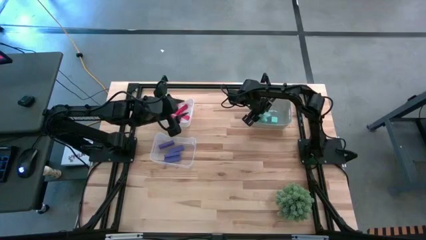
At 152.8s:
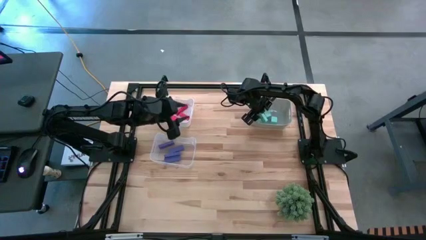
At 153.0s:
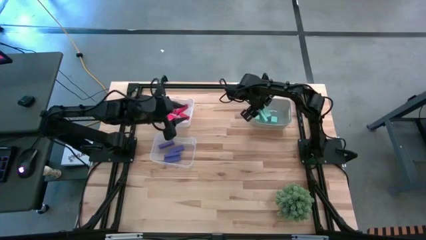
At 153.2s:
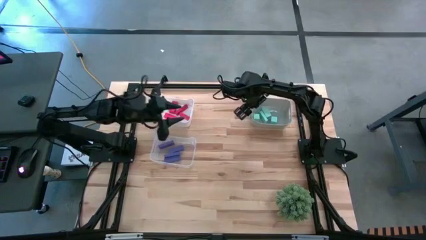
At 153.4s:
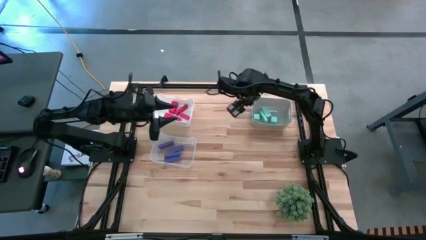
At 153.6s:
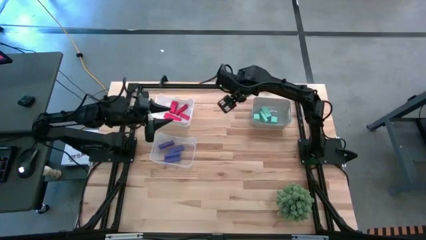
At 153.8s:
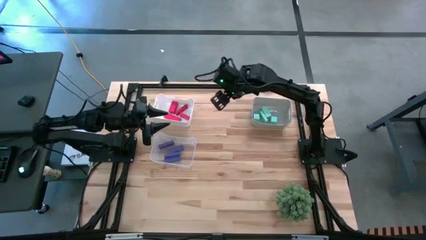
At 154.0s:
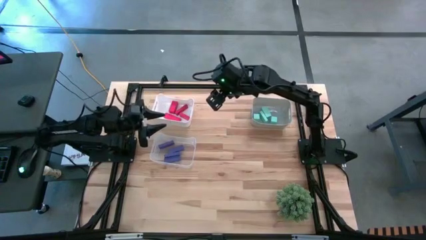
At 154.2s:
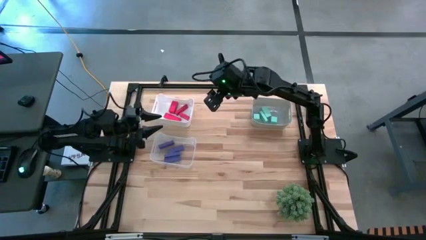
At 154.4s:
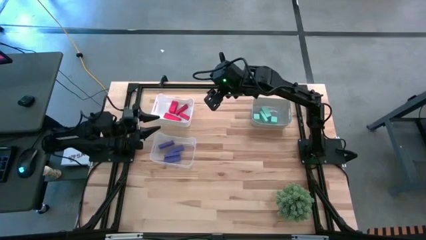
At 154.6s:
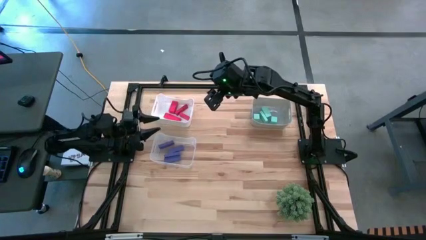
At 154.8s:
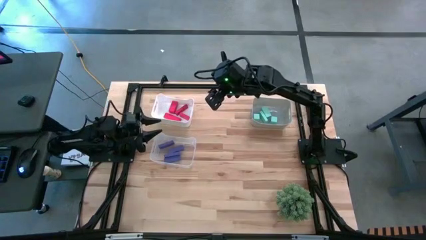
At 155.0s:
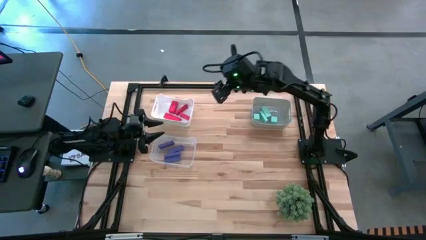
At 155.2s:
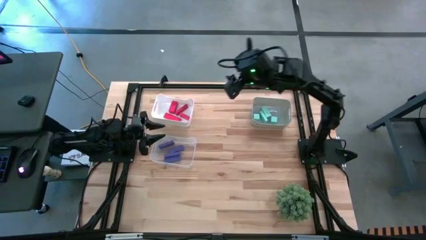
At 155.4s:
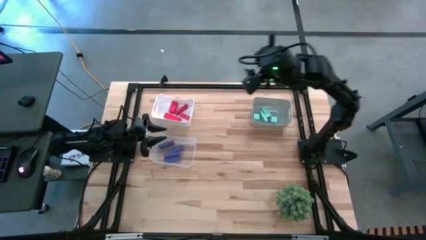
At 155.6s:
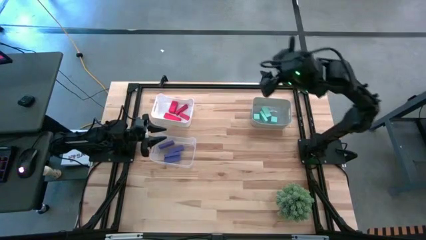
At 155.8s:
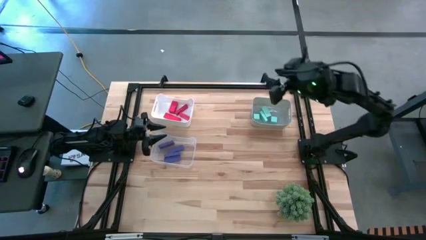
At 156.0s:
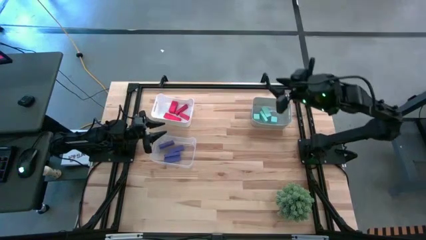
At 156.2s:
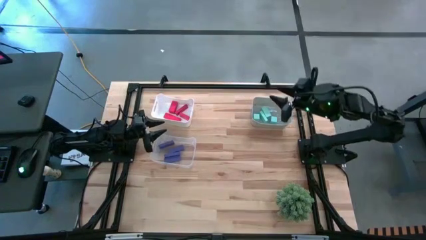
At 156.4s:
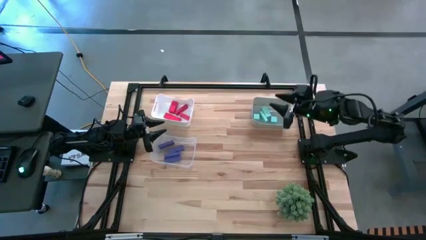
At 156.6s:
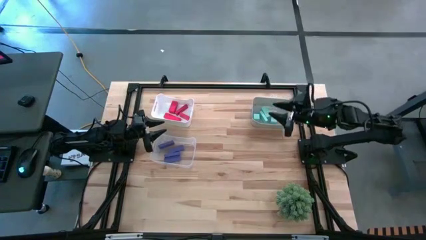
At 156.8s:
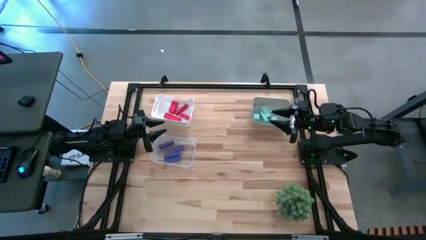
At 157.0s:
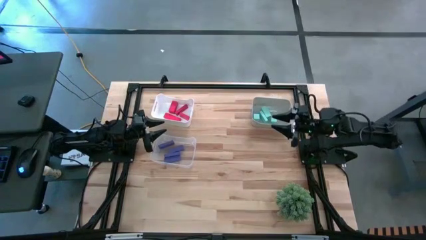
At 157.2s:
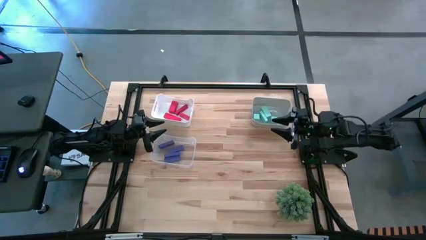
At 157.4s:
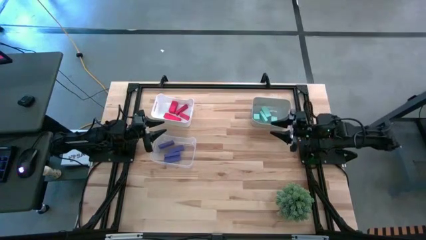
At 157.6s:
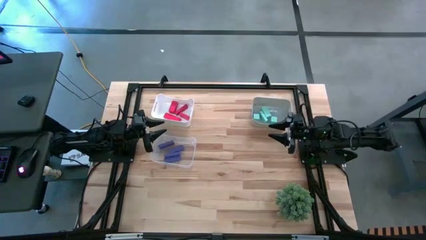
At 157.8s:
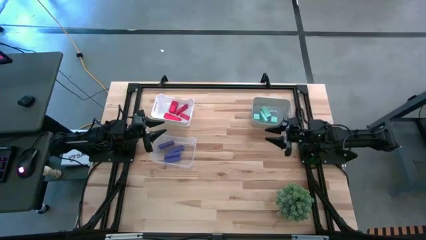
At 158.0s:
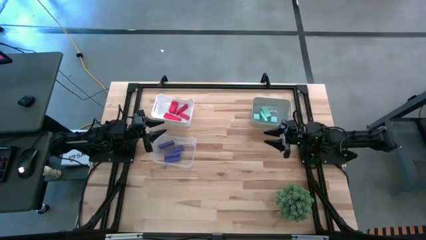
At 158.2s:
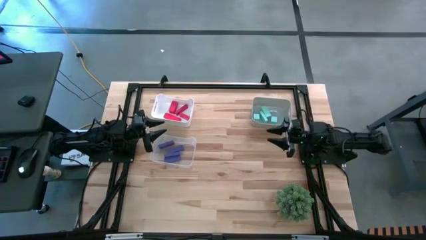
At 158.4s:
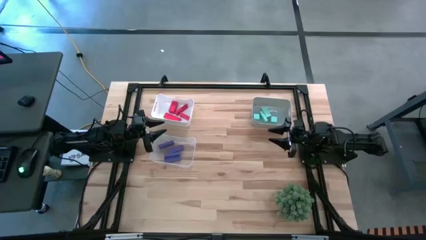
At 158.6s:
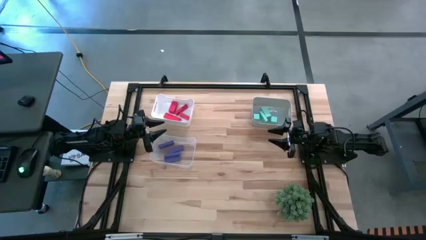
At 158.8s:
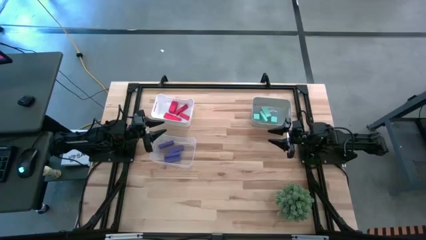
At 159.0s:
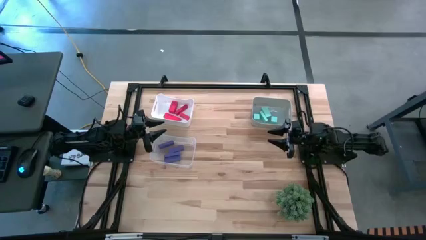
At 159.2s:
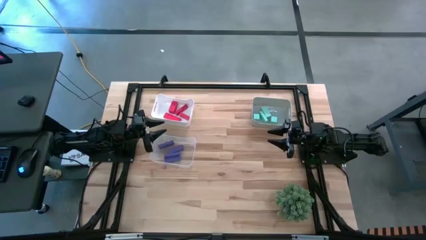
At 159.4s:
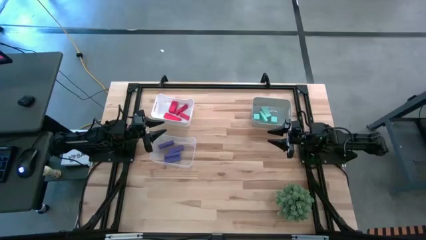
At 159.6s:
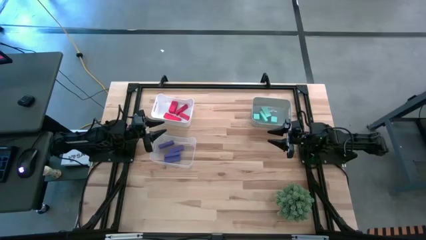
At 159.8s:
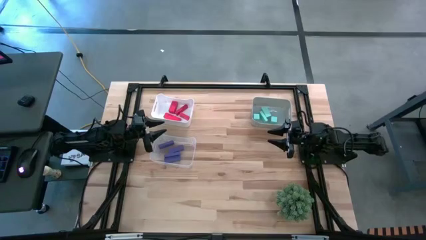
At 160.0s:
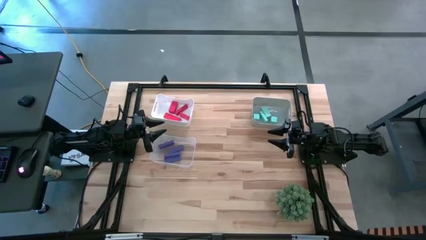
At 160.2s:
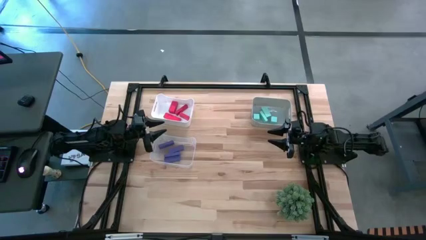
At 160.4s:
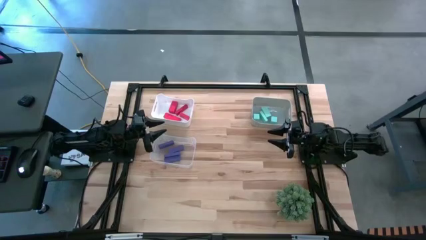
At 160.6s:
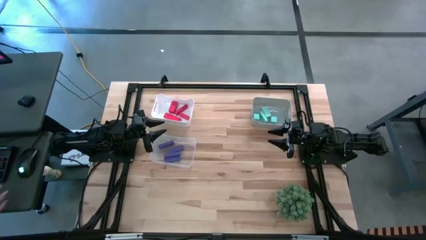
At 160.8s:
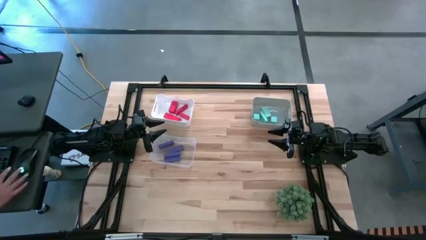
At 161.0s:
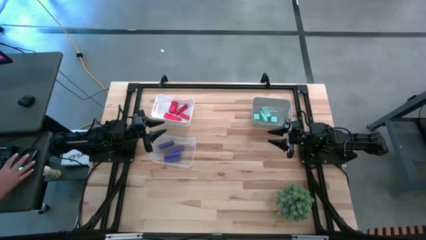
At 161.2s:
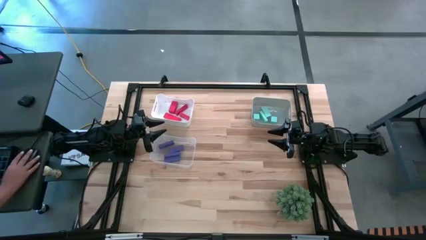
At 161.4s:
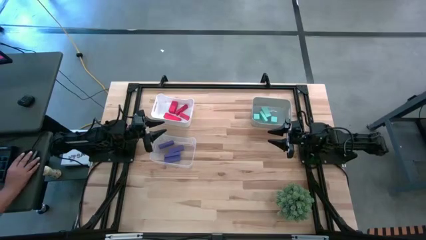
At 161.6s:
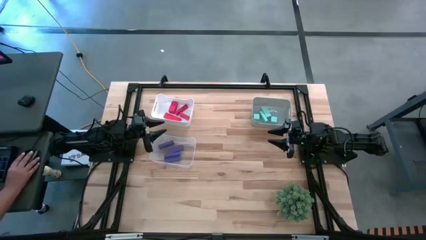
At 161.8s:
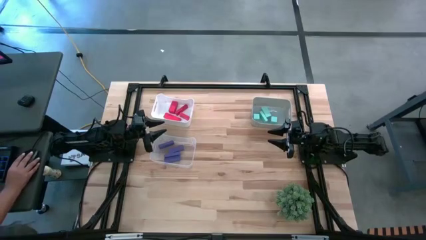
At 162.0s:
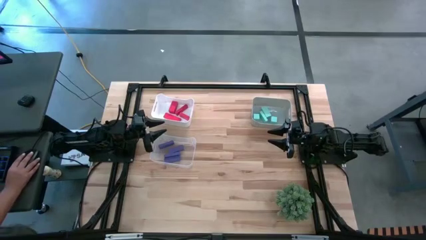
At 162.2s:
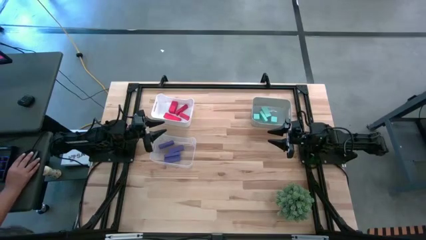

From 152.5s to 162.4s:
Task: Sort & place blocks by color
Return to Home Position

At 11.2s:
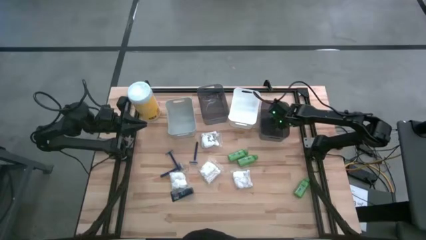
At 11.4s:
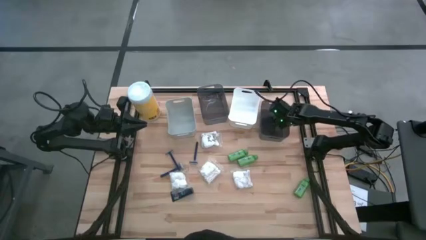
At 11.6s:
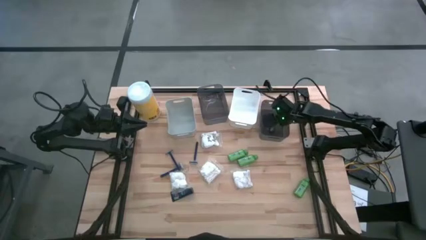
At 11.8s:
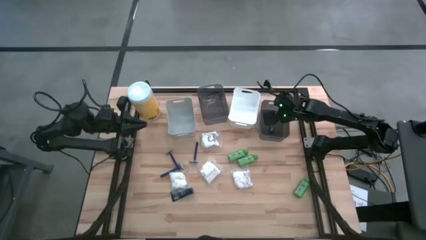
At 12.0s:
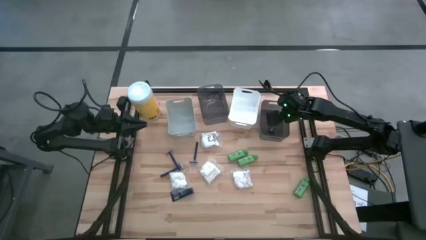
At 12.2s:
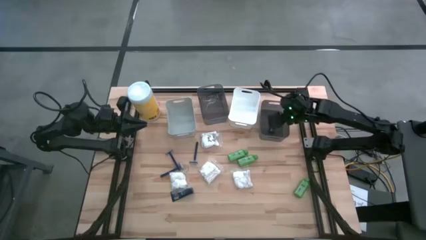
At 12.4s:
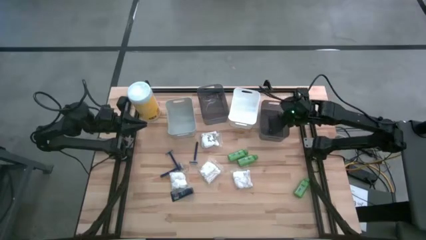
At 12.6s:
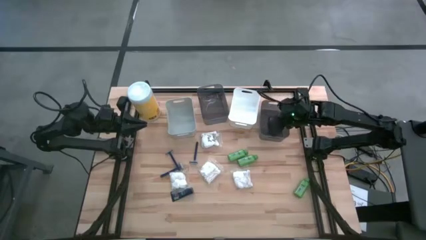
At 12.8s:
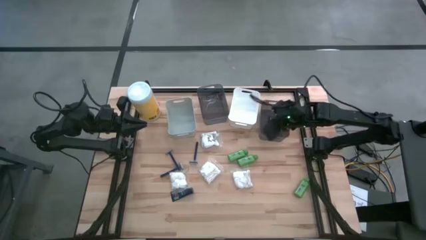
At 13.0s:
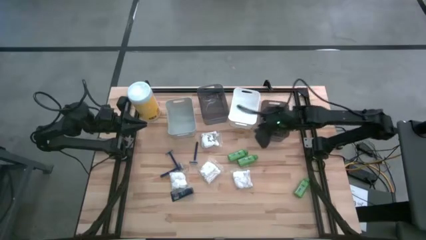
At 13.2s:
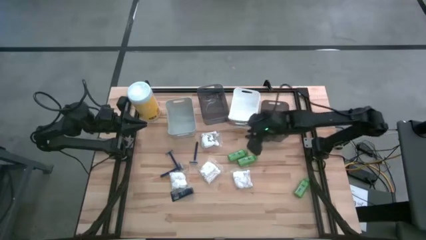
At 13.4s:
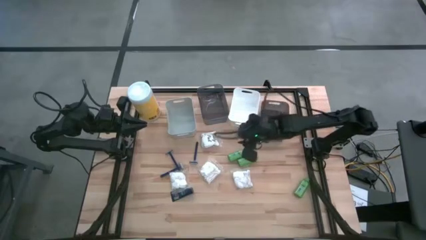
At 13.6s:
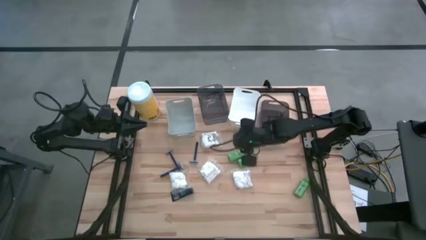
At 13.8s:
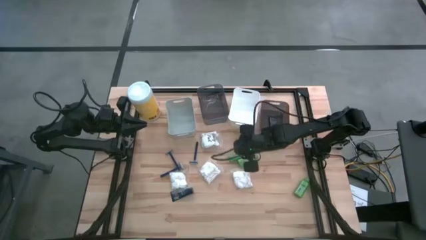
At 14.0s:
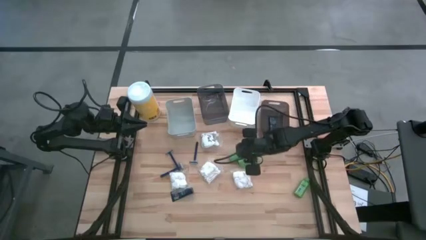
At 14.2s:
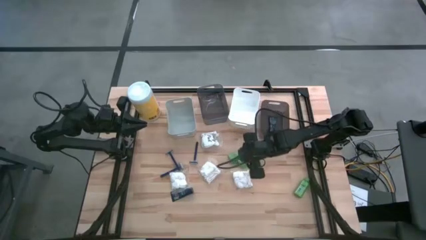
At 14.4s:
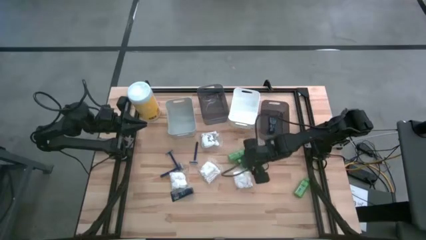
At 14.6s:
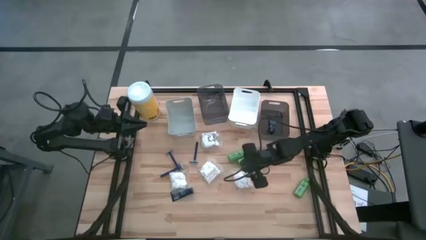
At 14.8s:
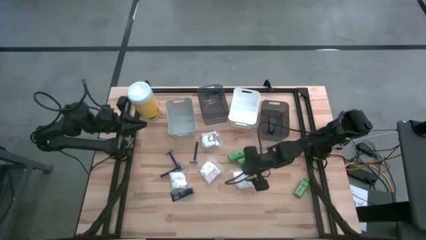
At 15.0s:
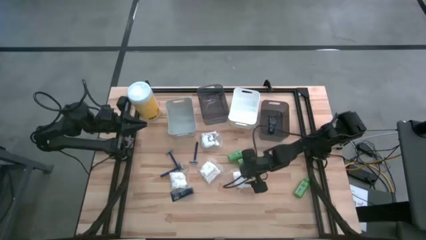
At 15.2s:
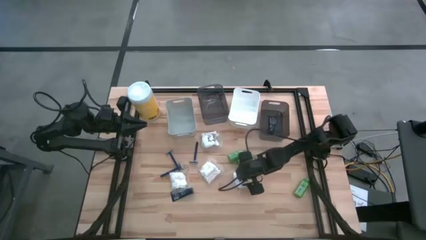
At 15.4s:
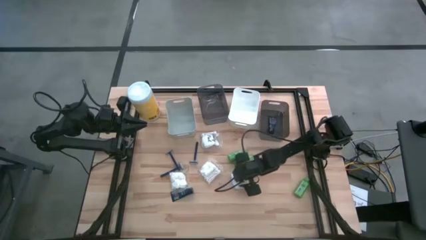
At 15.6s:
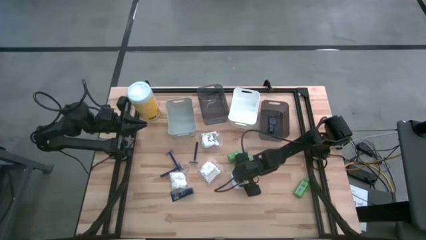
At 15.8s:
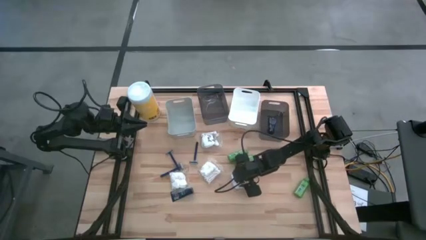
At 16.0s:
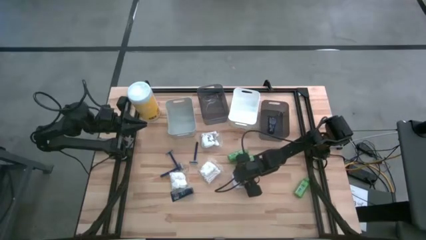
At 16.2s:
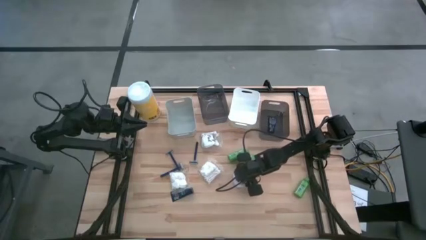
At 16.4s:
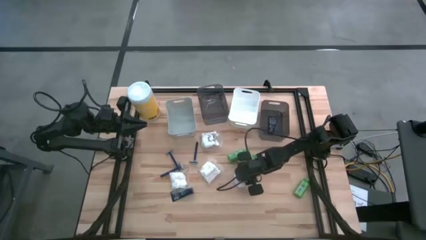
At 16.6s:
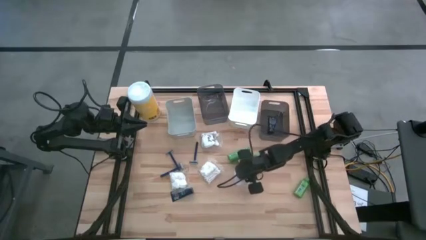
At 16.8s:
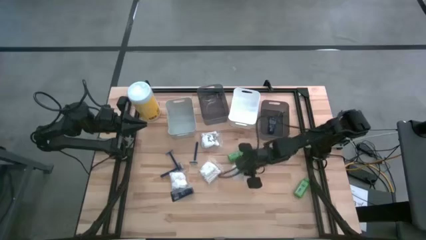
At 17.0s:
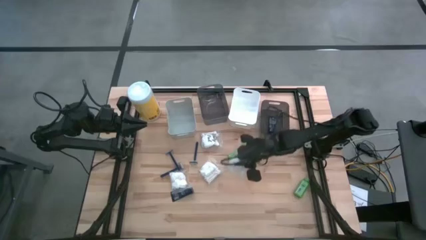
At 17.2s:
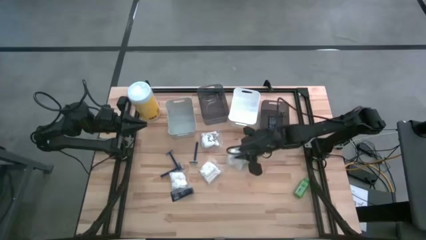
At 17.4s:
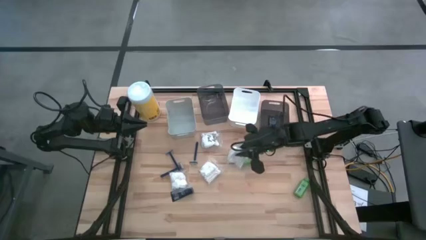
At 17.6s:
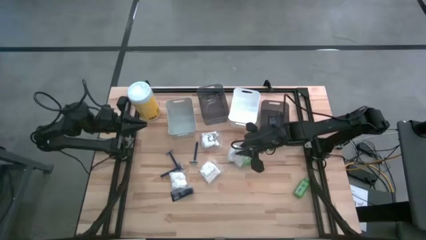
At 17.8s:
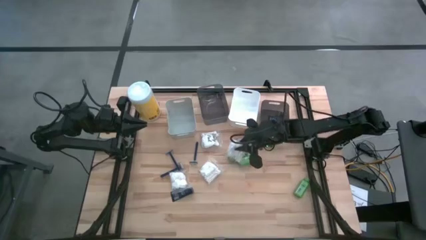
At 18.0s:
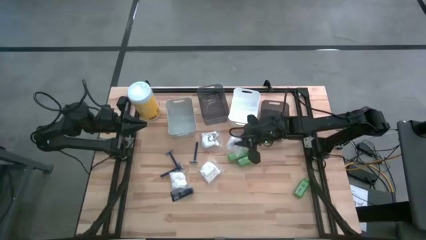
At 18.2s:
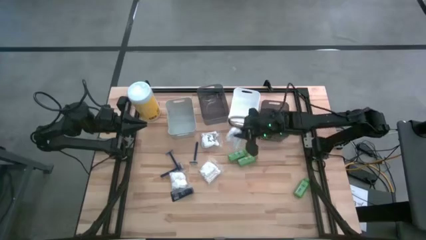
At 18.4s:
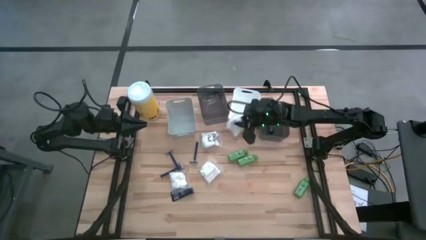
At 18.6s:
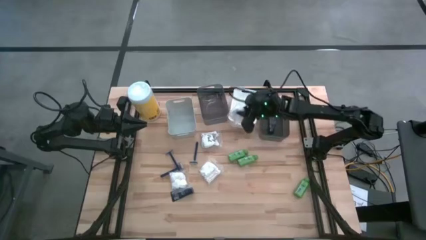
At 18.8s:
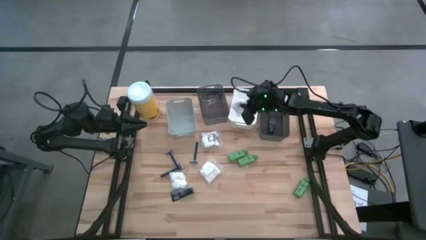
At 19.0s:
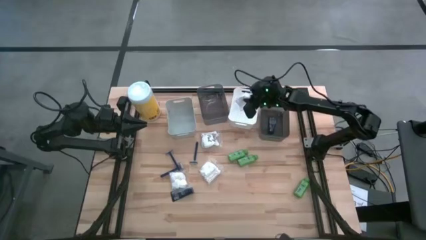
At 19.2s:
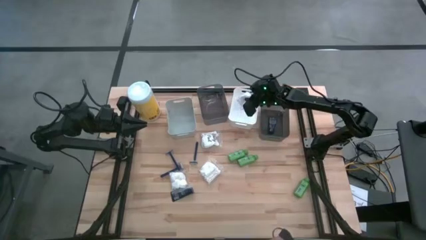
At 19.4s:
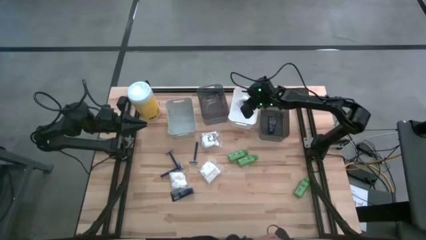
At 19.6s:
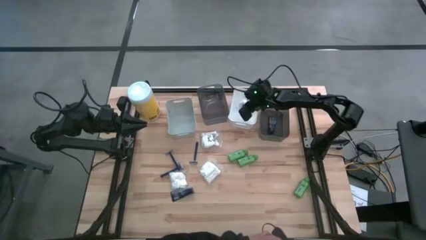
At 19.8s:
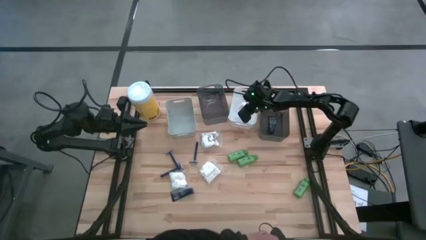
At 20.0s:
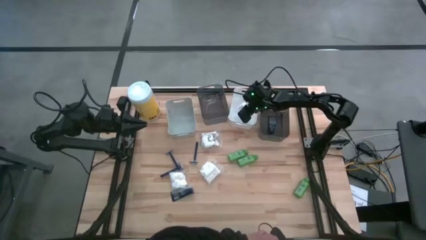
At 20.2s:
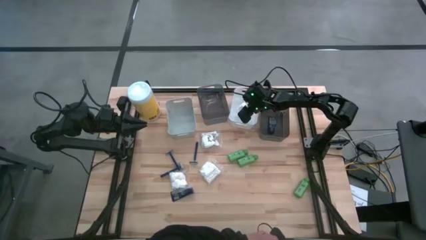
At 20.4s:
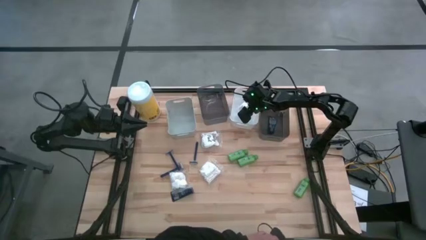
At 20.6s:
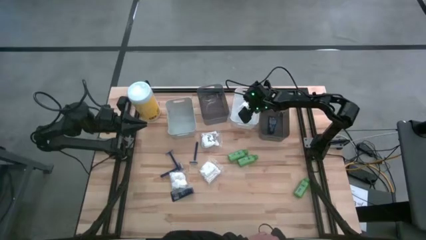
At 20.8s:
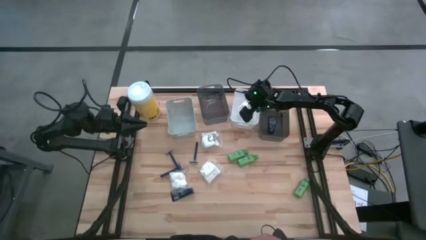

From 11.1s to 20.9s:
Task: Pick & Place Travel size toiletries
Put the white cotton pack into the white bin
